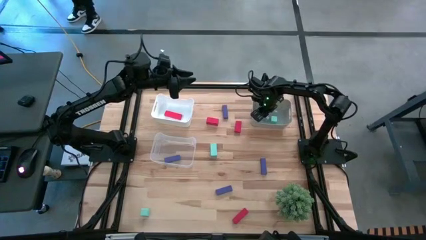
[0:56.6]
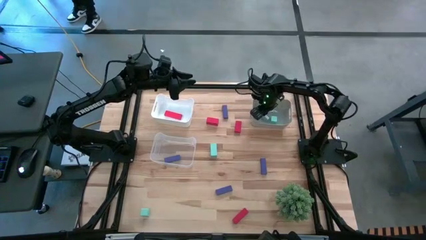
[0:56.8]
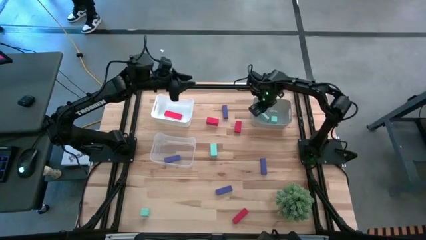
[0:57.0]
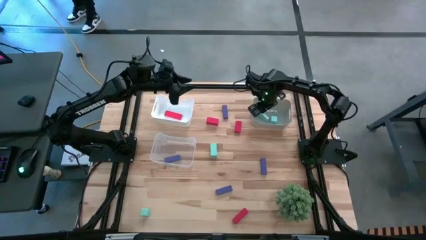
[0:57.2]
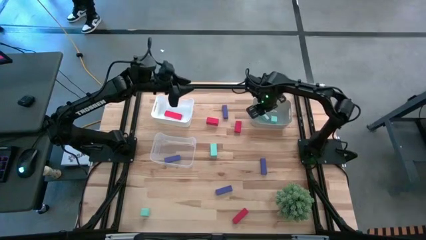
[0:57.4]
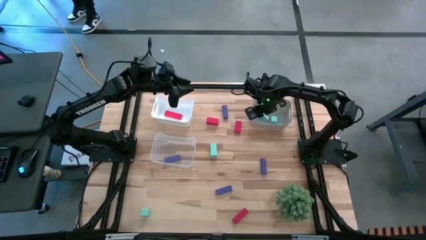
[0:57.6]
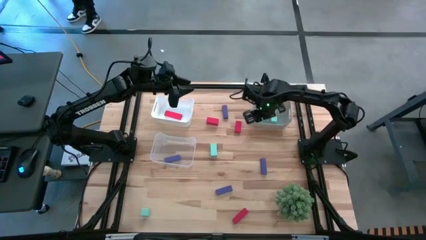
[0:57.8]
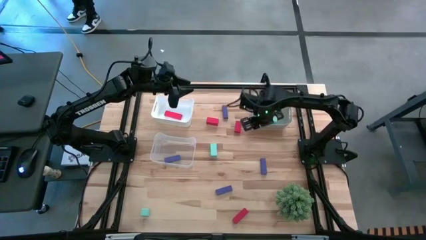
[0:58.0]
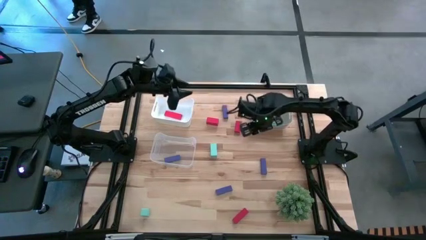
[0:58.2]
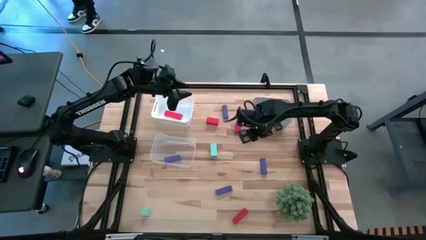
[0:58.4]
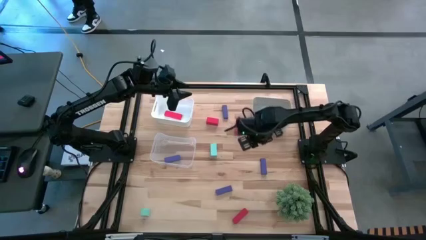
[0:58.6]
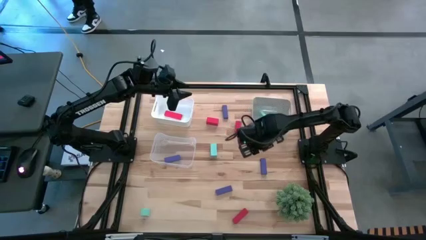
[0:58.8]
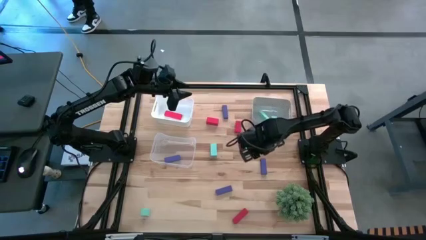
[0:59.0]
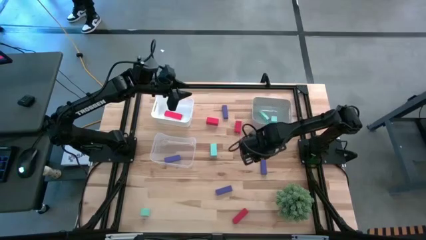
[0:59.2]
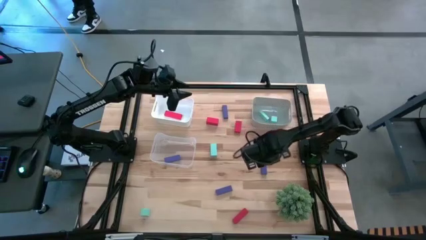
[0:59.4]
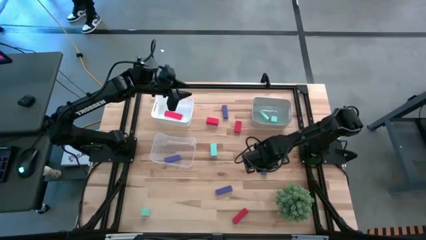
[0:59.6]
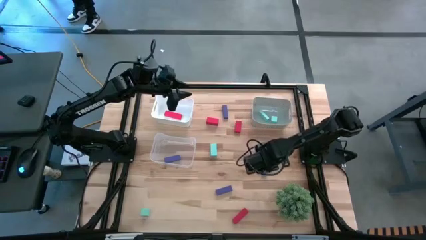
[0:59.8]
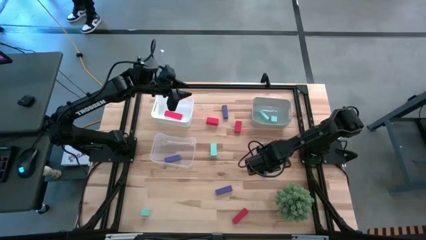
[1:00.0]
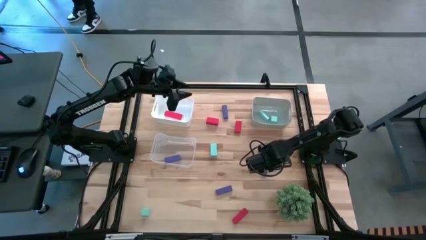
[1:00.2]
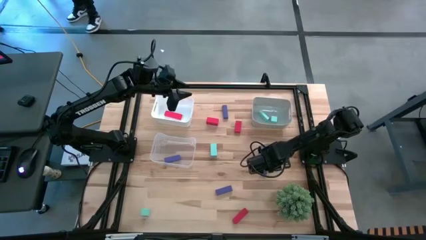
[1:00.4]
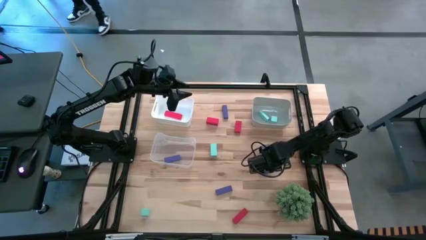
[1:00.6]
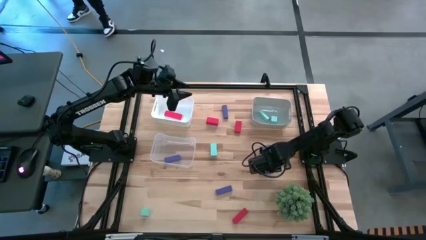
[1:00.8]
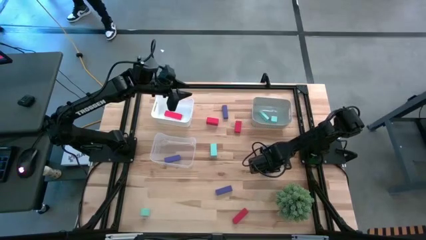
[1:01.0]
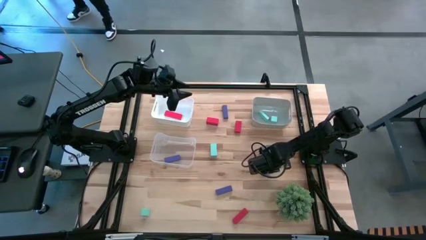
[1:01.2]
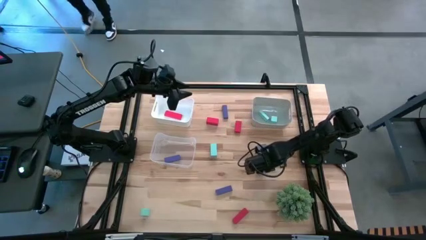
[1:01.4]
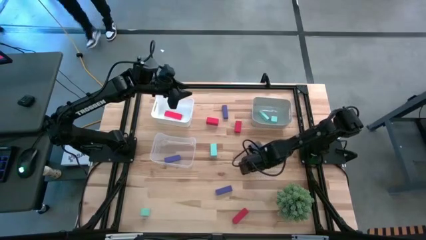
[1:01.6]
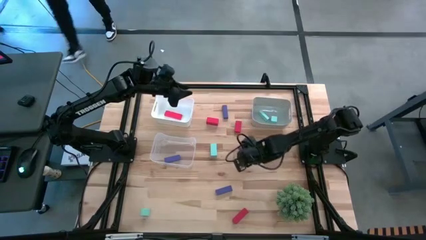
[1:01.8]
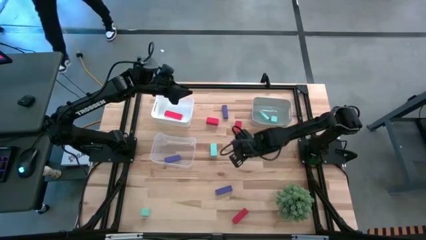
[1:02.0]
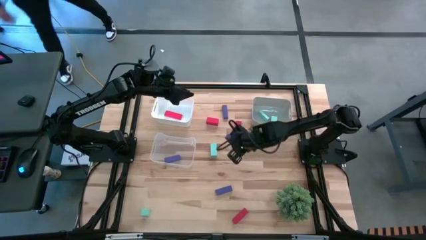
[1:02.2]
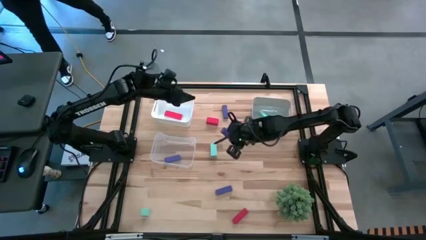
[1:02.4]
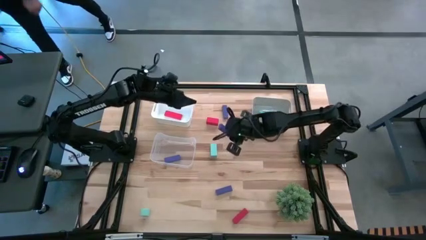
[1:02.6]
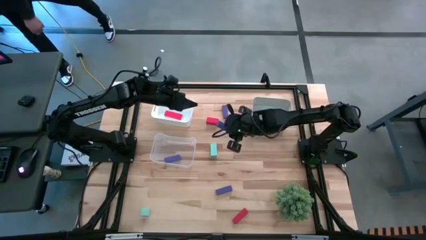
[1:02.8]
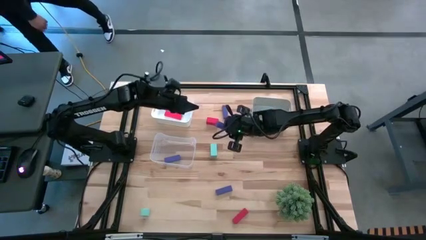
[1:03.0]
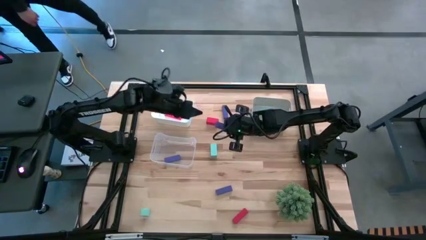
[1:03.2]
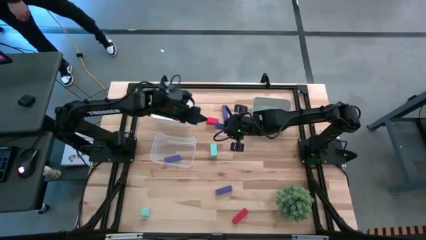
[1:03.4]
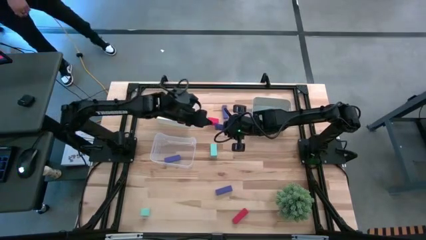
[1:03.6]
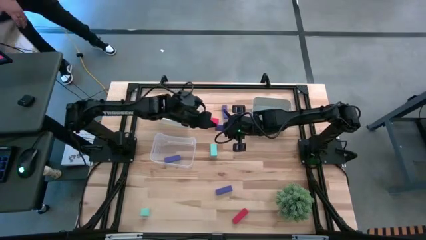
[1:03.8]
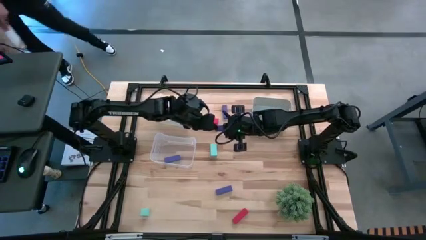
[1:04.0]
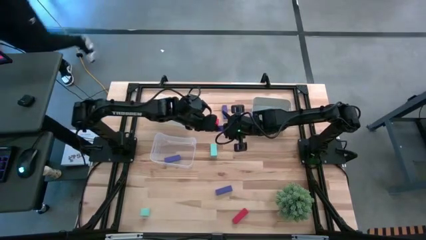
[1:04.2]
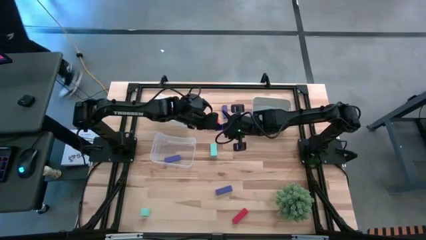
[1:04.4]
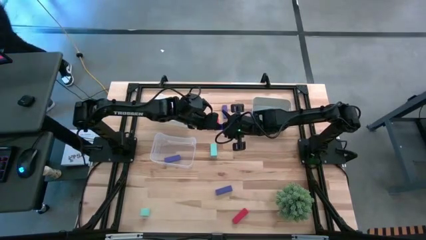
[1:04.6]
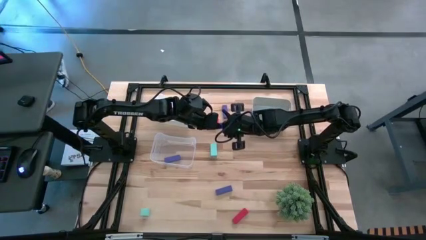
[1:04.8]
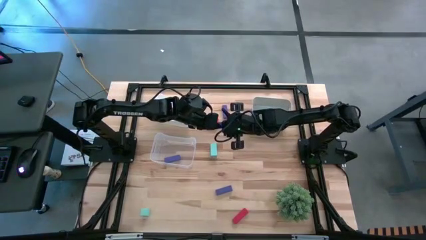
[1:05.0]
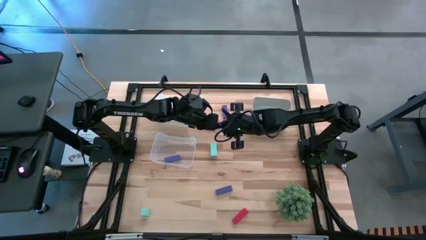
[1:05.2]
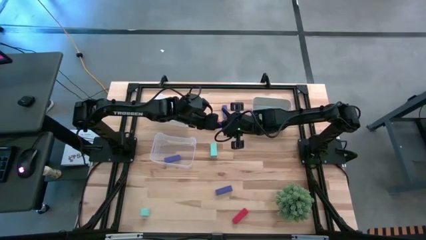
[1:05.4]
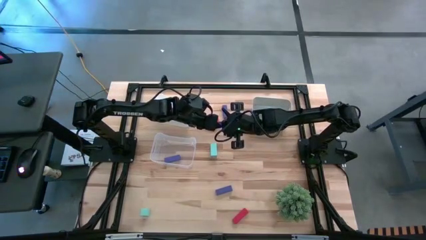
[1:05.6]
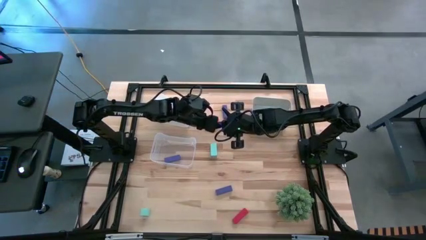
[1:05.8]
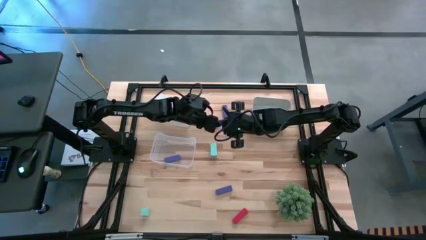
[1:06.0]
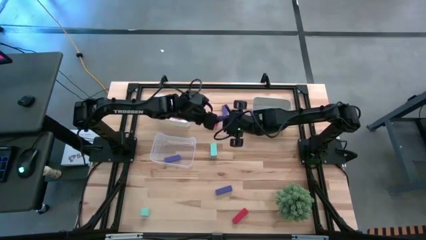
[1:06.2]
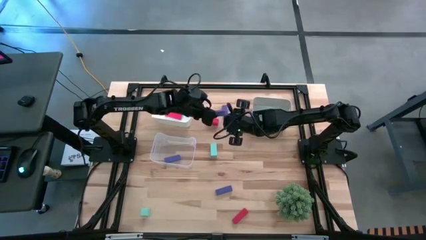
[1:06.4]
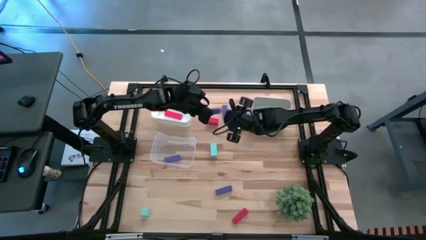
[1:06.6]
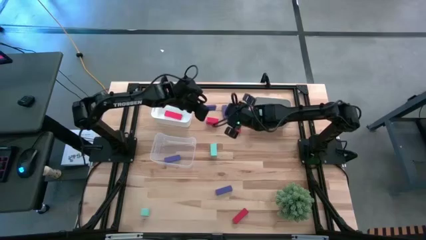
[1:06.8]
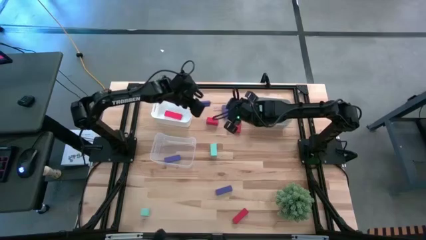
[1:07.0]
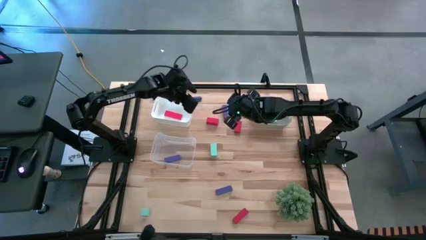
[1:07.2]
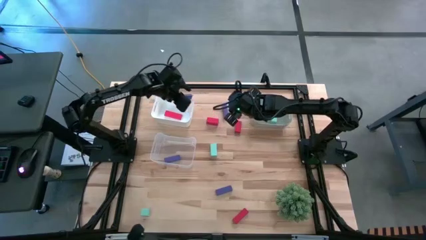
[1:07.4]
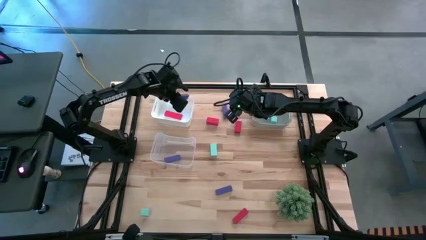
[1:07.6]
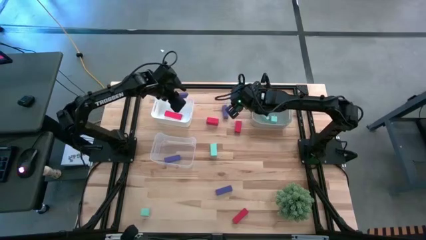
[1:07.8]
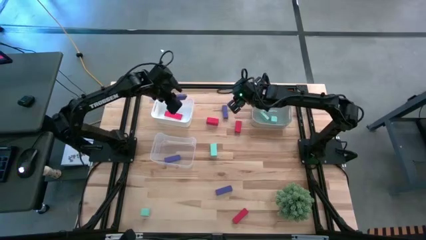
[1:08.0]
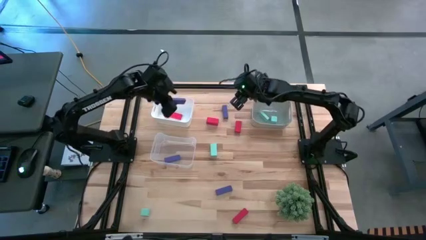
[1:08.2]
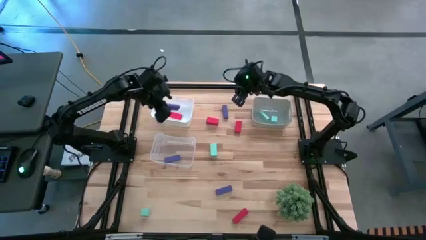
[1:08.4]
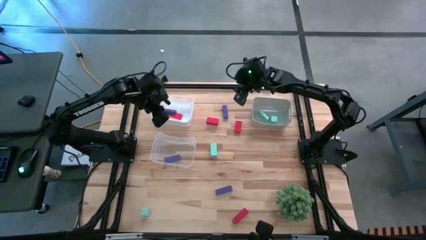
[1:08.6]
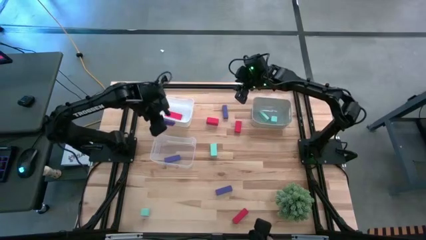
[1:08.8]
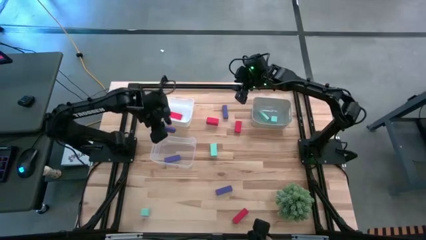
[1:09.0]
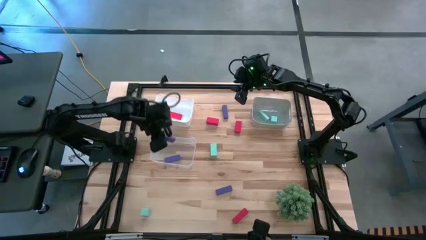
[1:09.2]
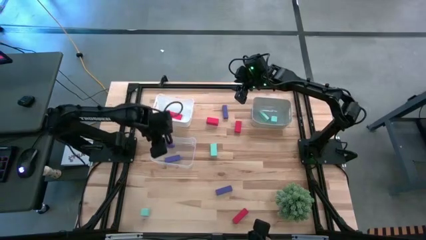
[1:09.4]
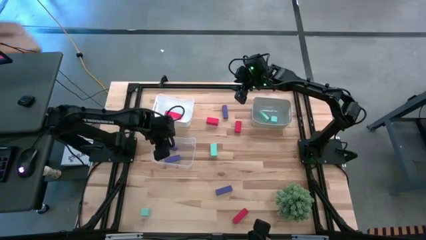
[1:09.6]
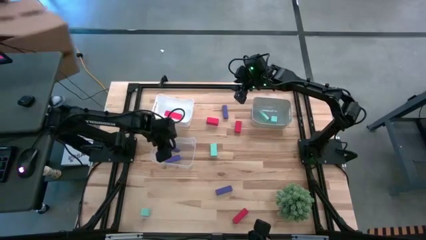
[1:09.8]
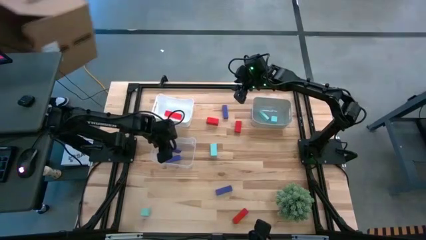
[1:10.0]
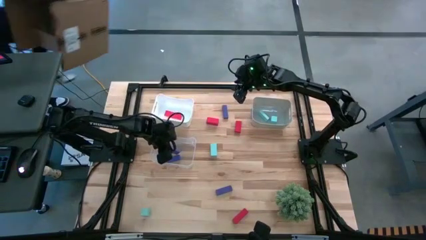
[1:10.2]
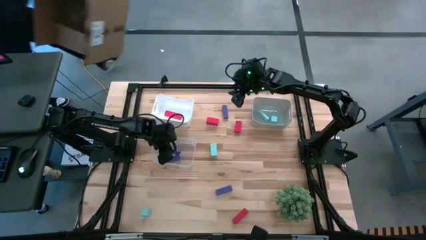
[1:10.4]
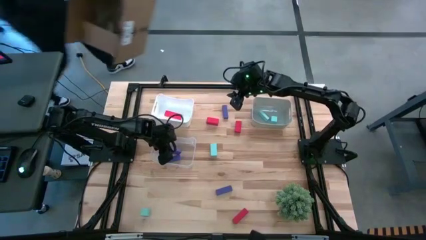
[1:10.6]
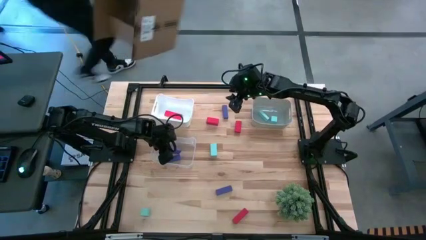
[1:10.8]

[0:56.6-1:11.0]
Task: Sort & place blocks by color
Put the purple block into the transparent bin
